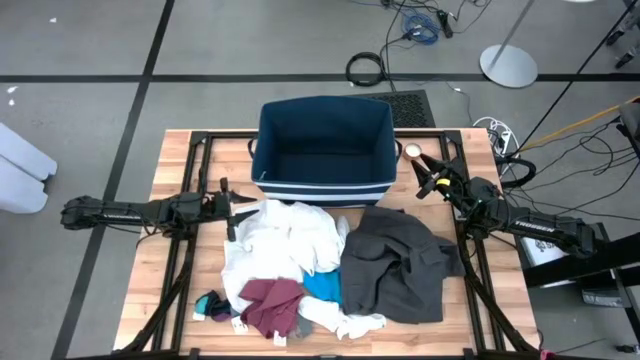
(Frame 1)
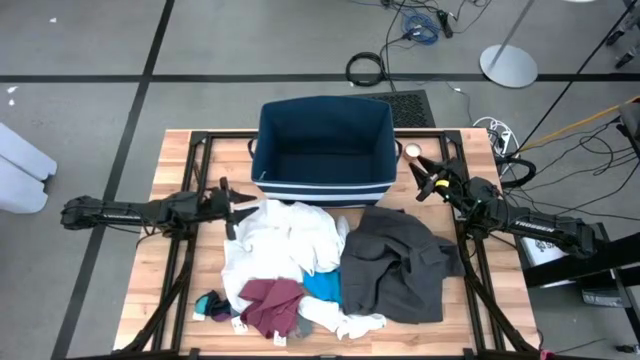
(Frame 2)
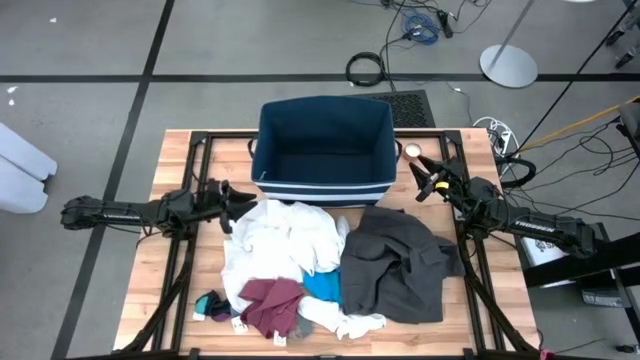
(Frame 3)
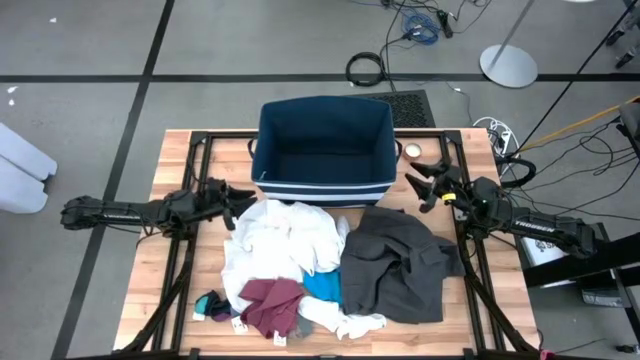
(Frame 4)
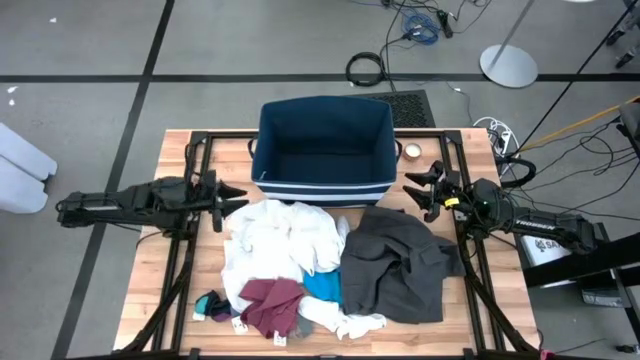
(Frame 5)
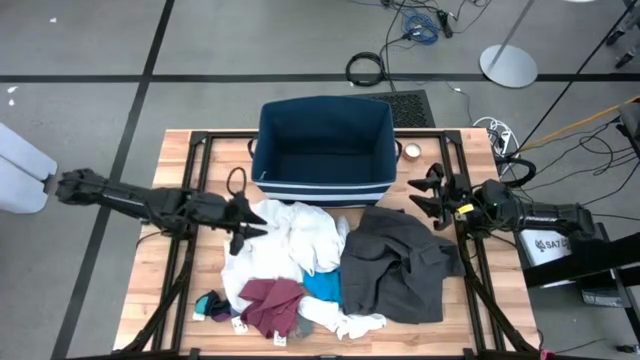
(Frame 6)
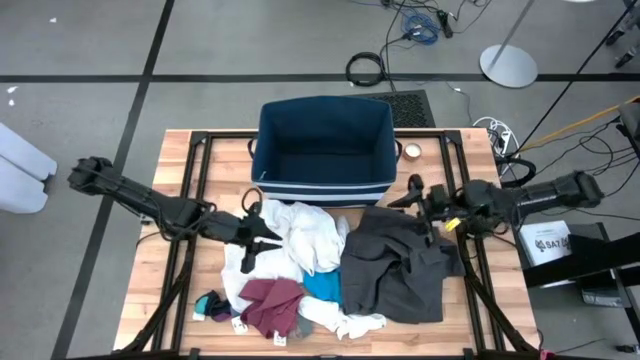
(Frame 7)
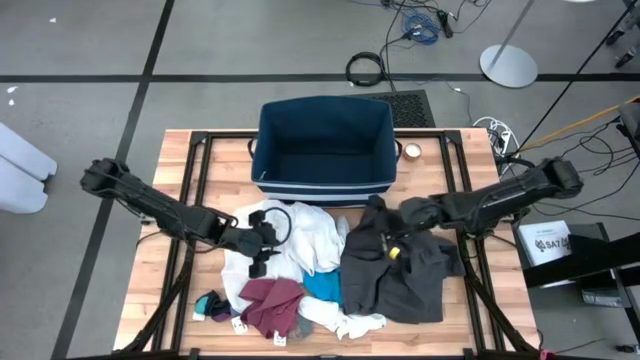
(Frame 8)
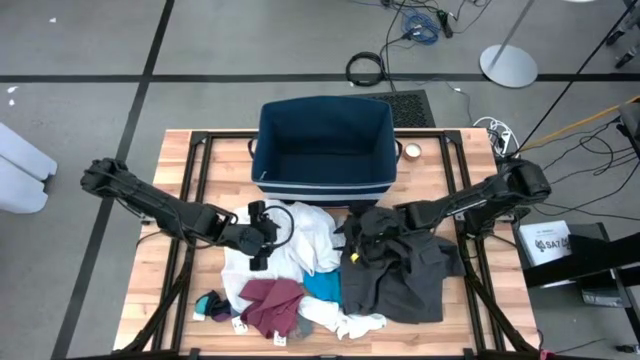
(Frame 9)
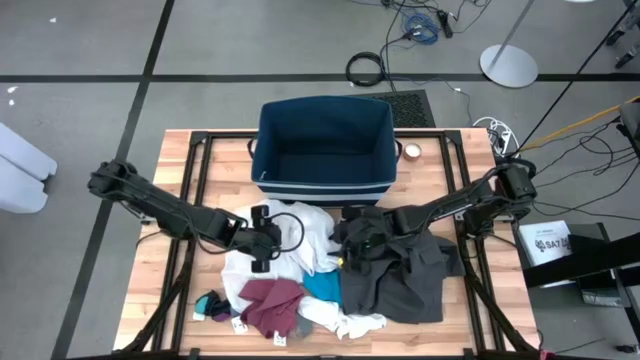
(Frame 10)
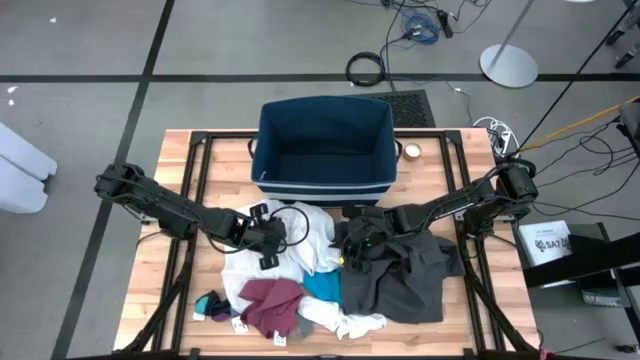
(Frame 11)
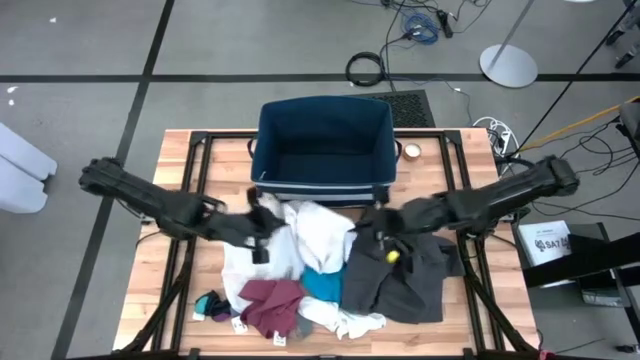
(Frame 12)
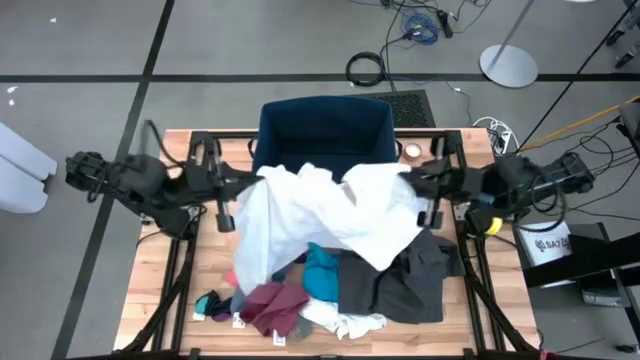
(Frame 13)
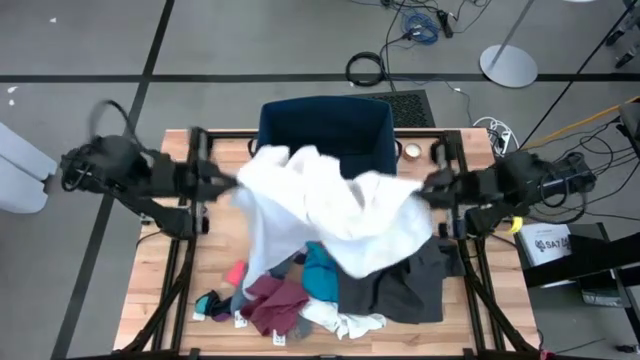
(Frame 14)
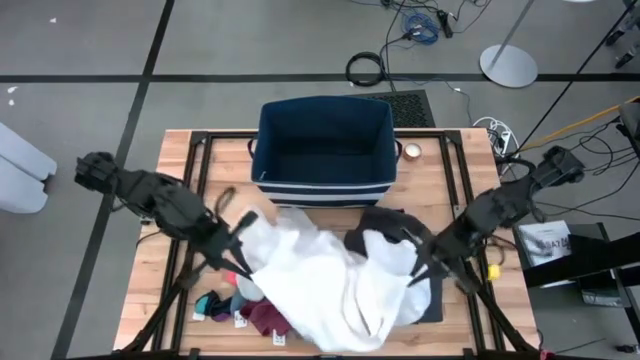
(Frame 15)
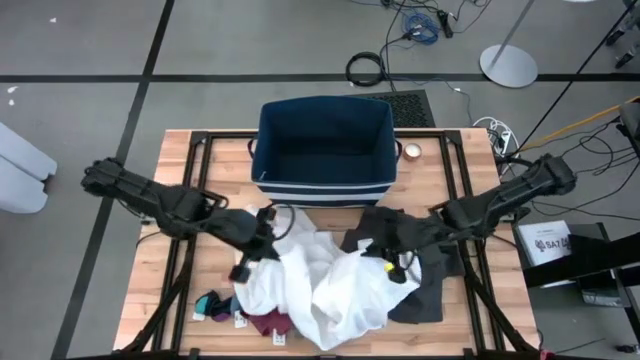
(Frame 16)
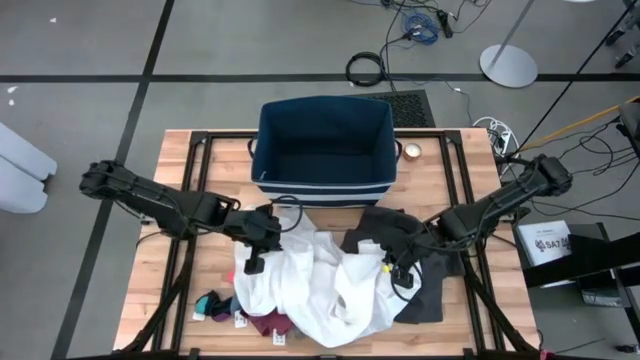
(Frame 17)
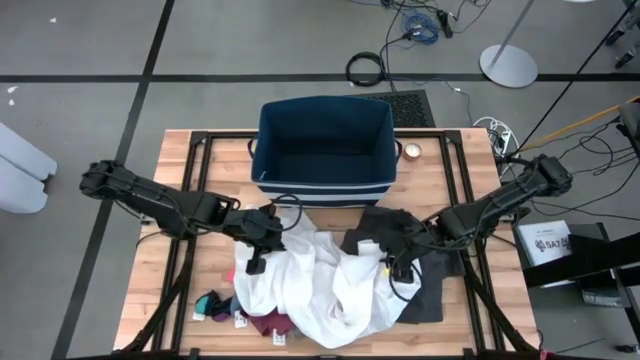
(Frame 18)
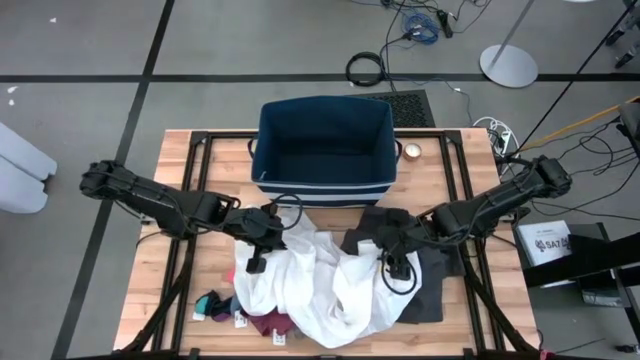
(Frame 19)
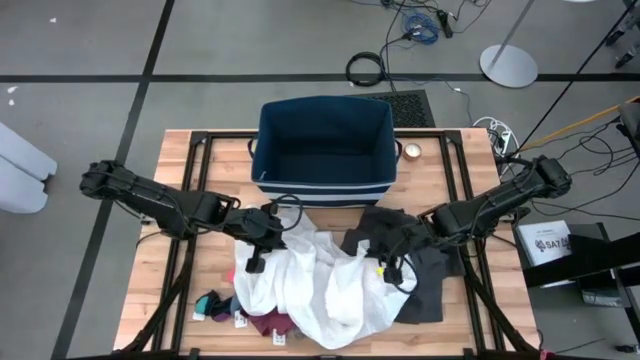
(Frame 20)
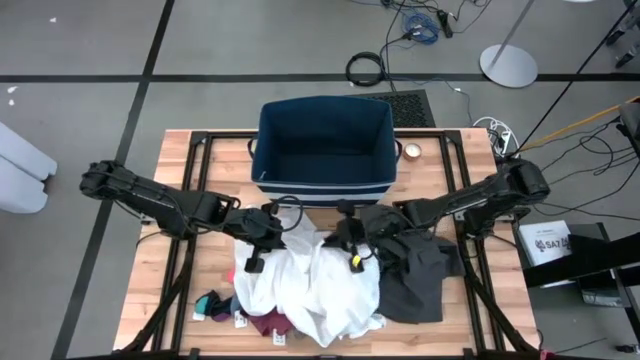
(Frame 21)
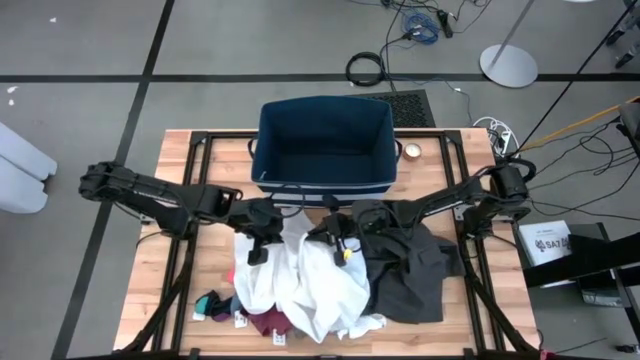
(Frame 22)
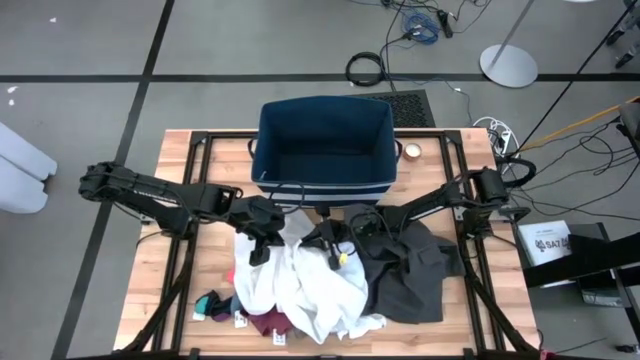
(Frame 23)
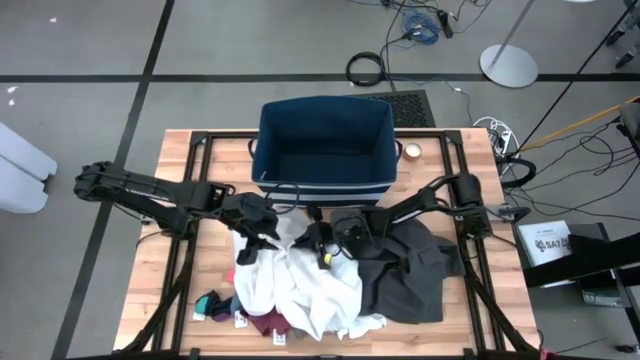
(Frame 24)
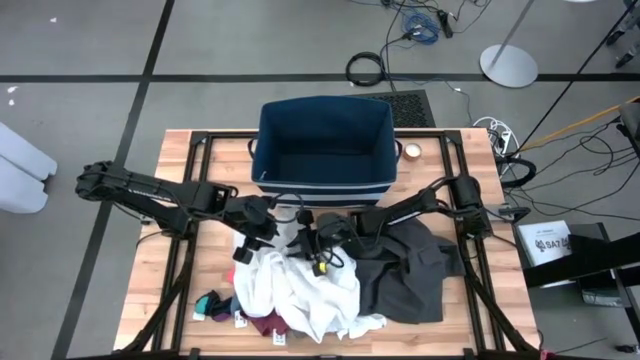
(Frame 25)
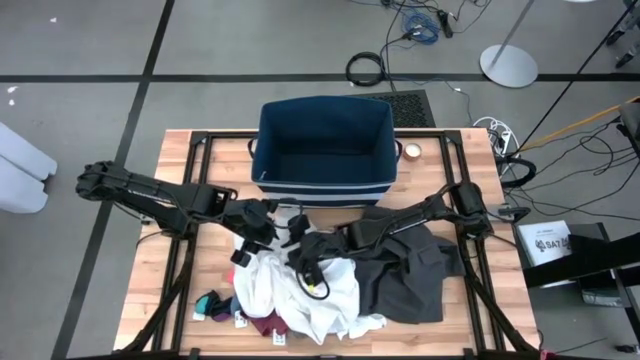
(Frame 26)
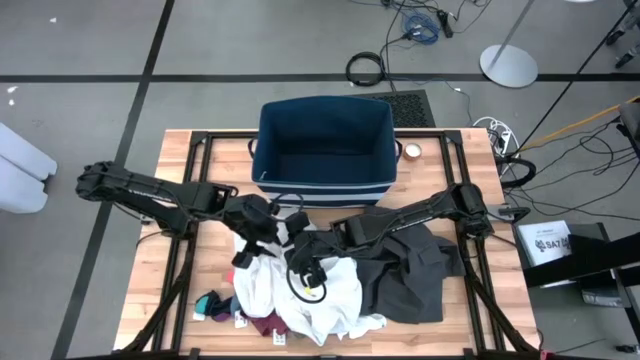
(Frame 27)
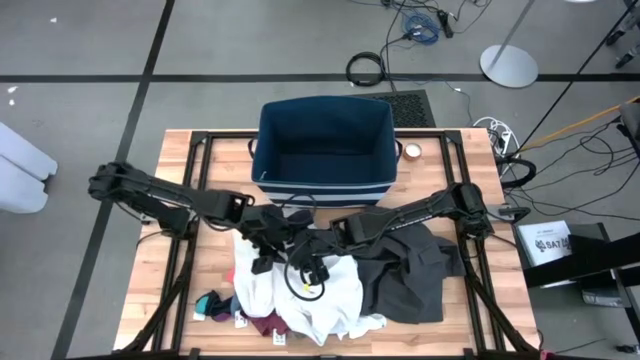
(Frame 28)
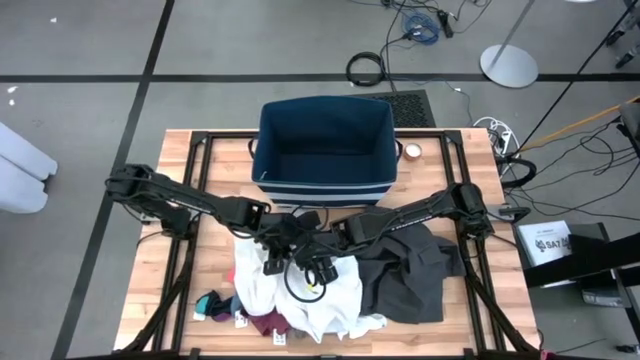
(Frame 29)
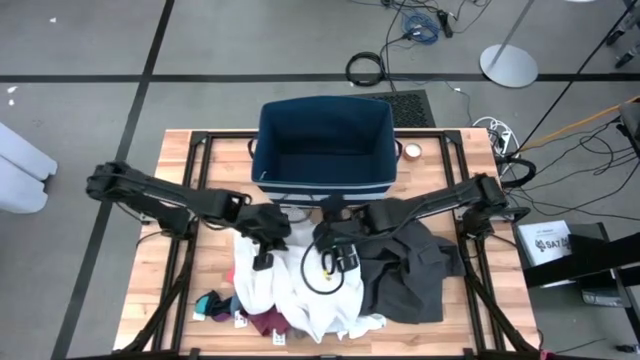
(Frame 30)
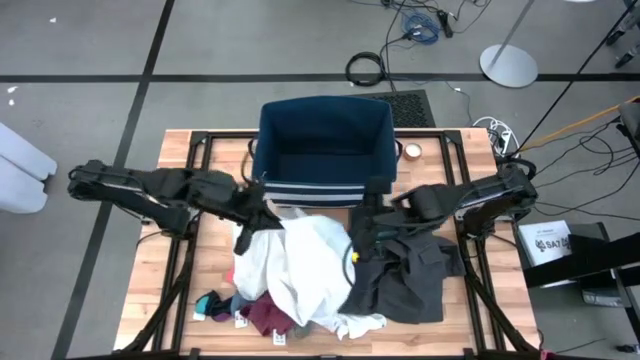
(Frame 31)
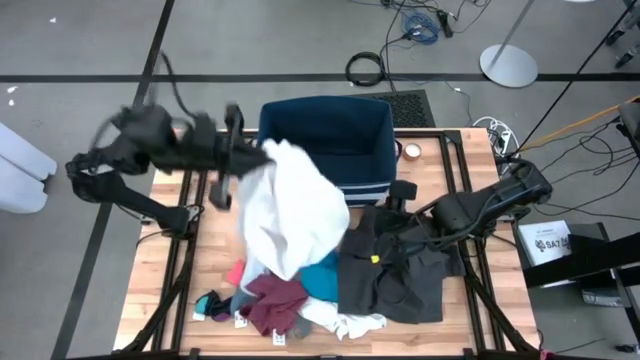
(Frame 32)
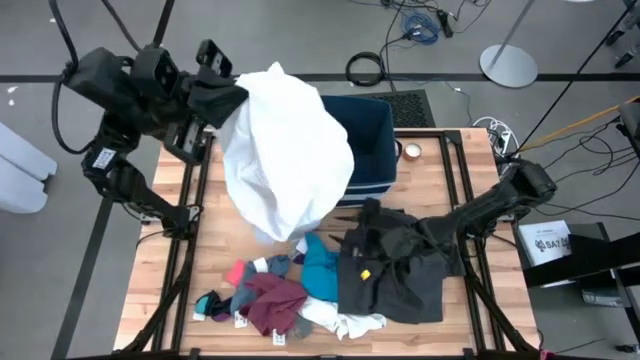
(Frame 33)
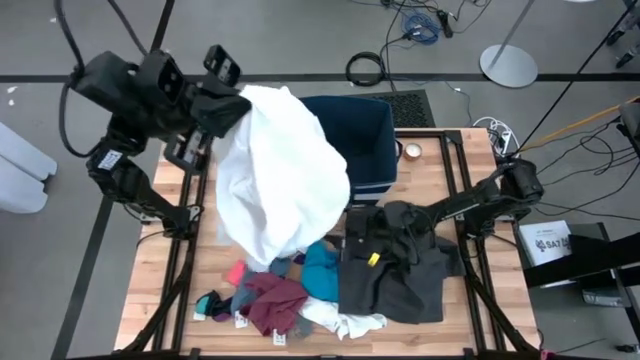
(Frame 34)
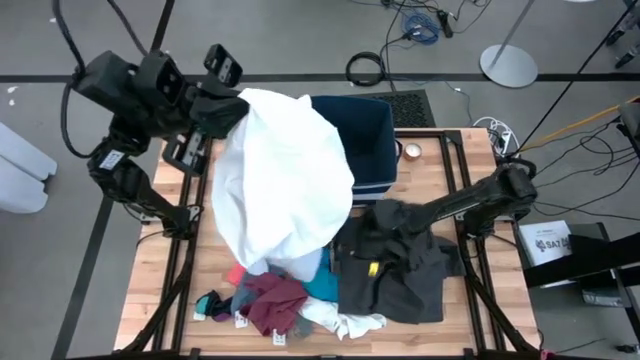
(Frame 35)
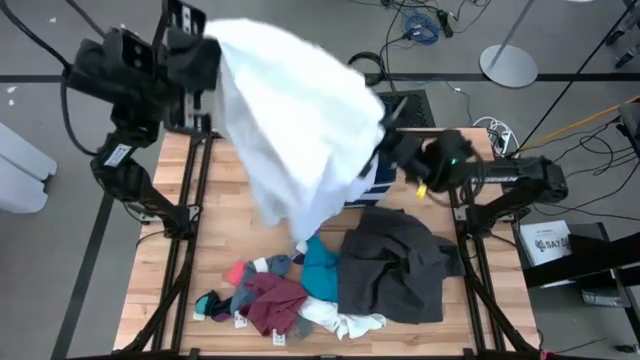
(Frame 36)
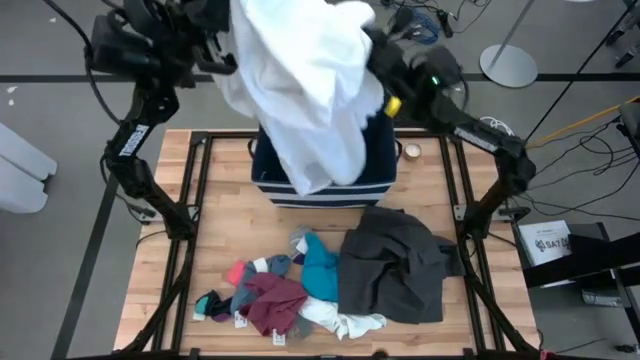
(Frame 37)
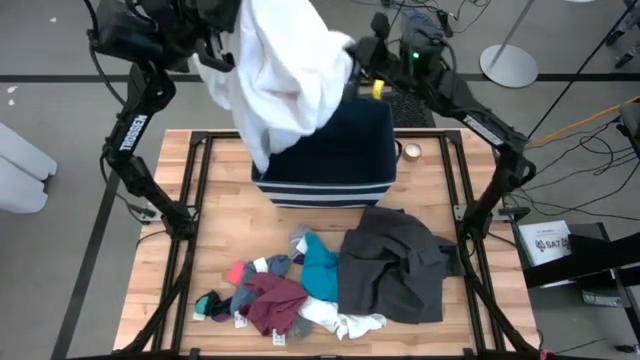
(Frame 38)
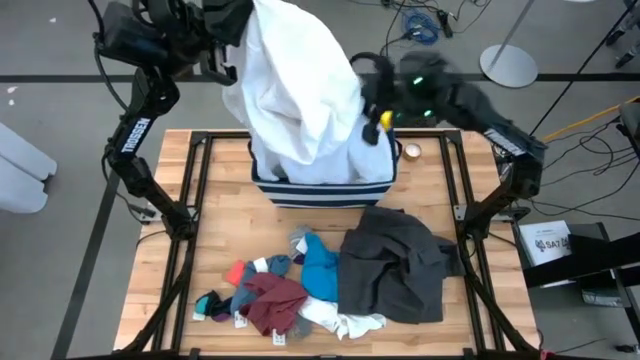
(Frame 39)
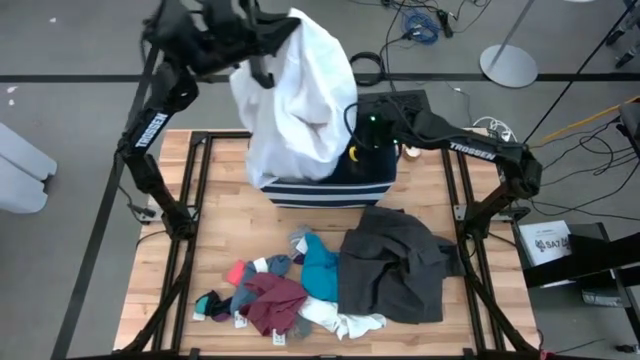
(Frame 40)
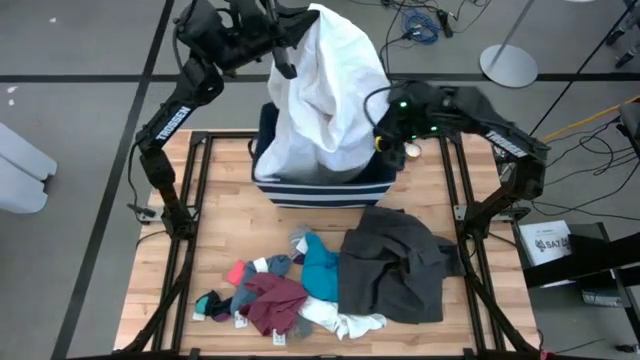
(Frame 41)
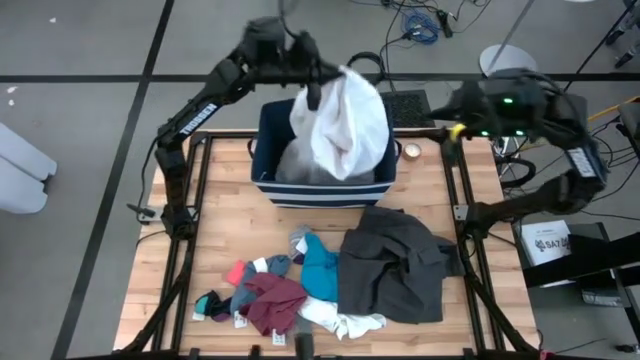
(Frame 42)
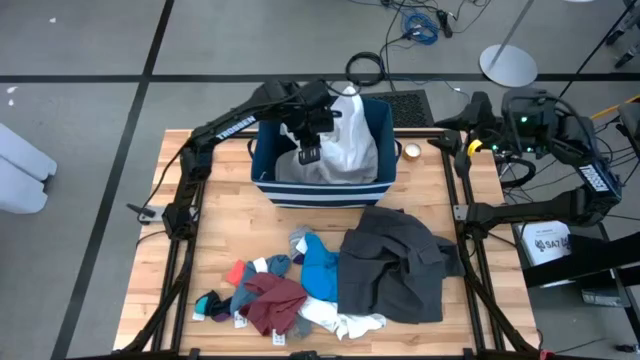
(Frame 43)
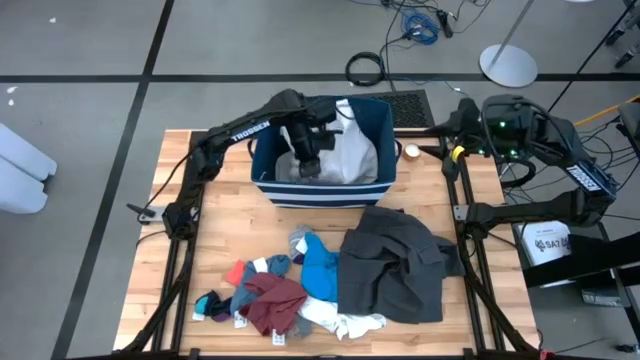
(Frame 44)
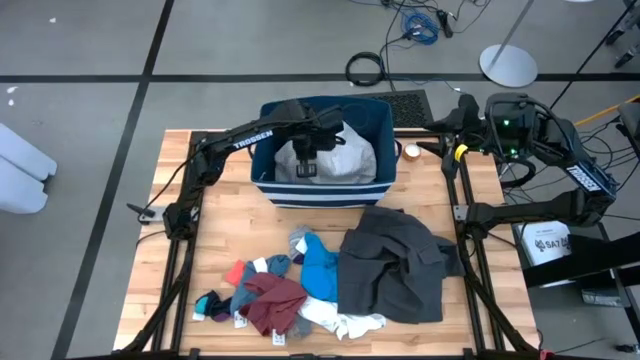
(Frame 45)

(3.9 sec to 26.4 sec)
Task: Sort clothes
Put the white shirt into the blue bin
